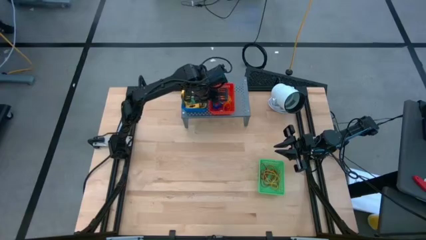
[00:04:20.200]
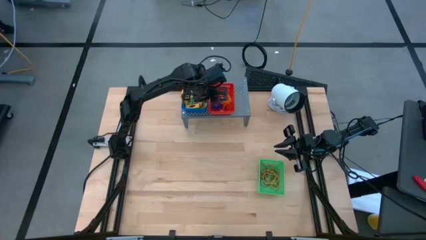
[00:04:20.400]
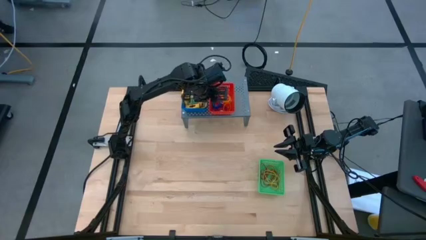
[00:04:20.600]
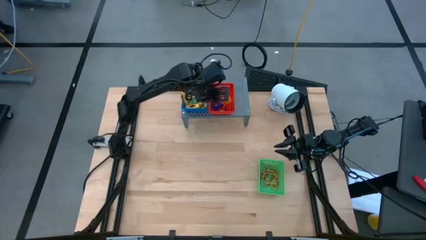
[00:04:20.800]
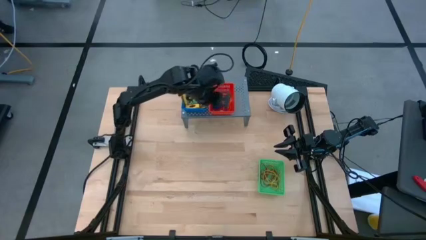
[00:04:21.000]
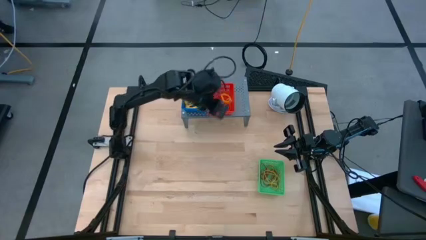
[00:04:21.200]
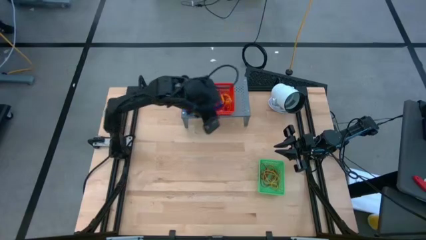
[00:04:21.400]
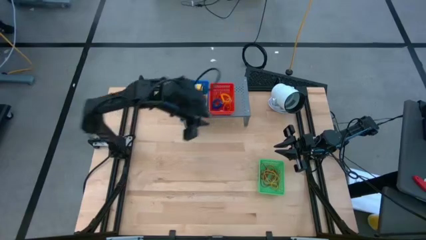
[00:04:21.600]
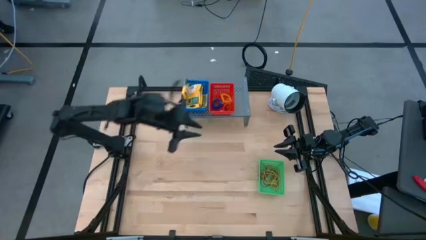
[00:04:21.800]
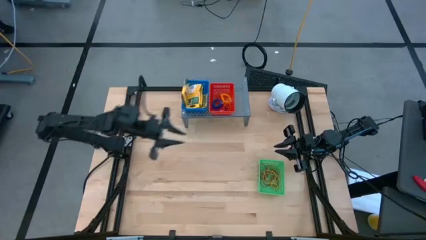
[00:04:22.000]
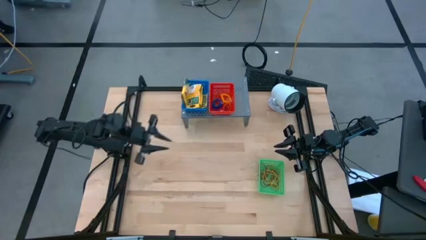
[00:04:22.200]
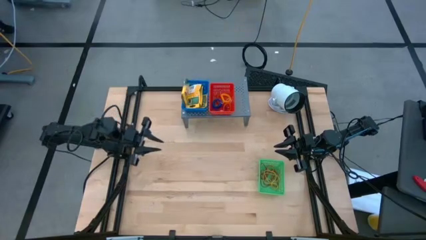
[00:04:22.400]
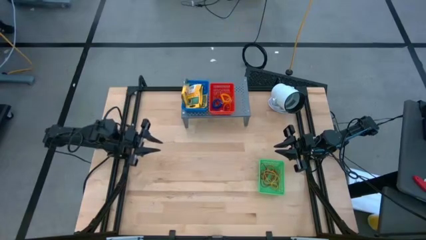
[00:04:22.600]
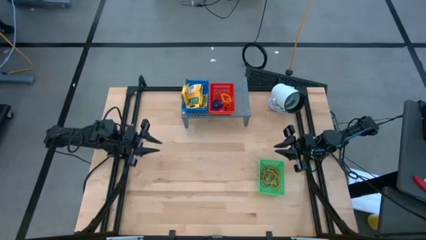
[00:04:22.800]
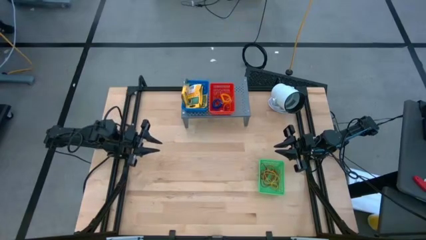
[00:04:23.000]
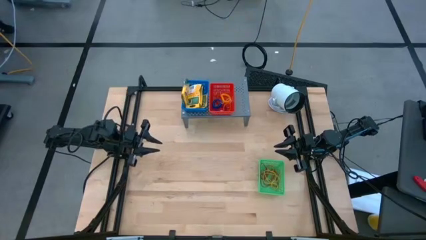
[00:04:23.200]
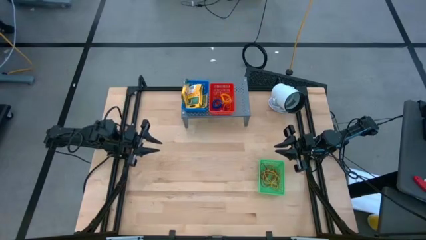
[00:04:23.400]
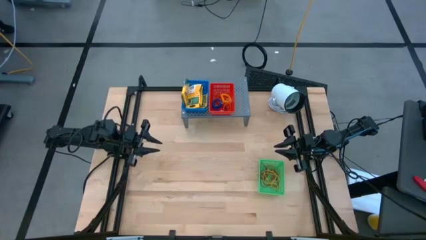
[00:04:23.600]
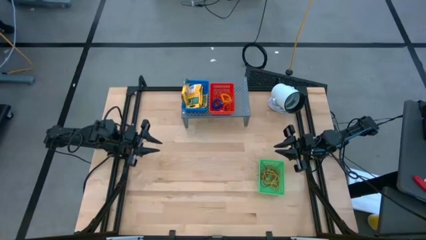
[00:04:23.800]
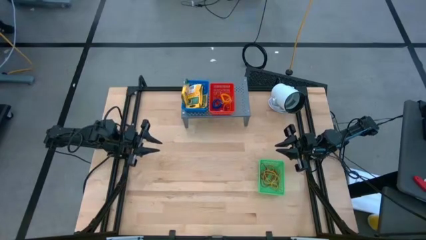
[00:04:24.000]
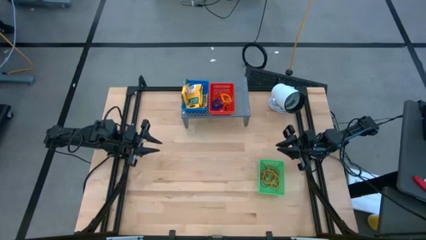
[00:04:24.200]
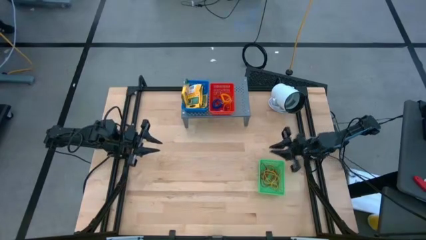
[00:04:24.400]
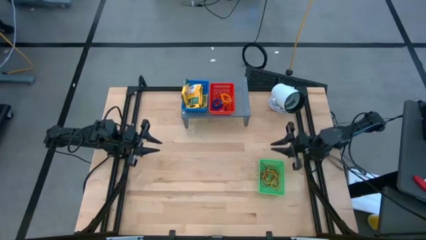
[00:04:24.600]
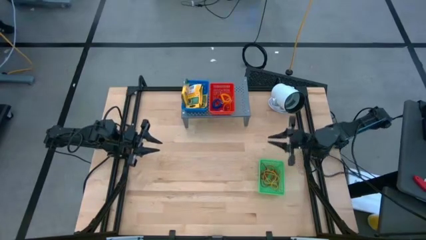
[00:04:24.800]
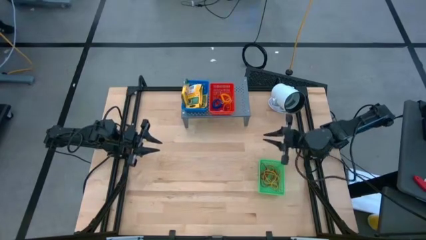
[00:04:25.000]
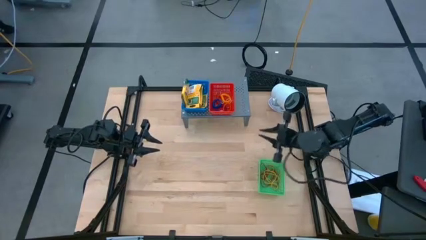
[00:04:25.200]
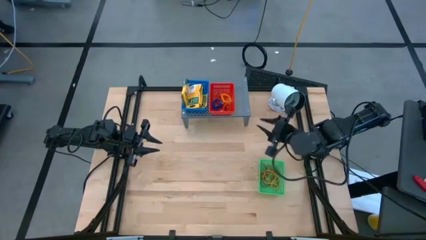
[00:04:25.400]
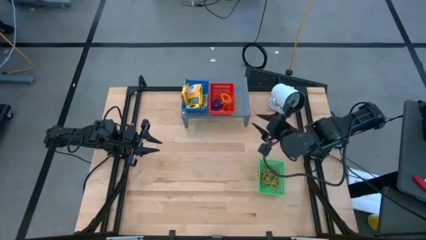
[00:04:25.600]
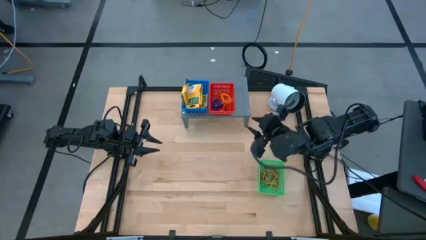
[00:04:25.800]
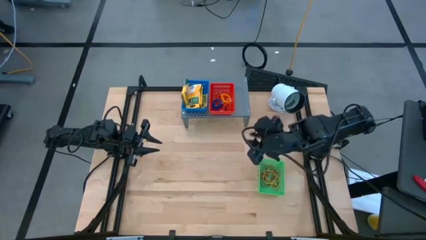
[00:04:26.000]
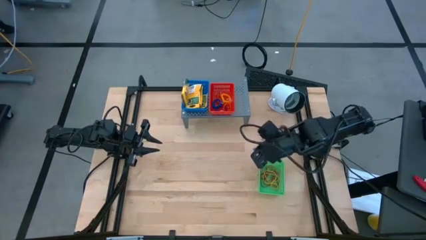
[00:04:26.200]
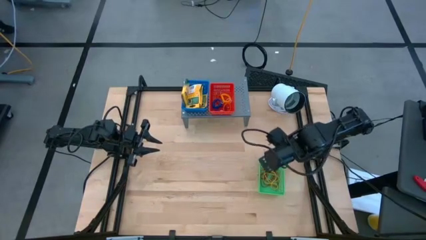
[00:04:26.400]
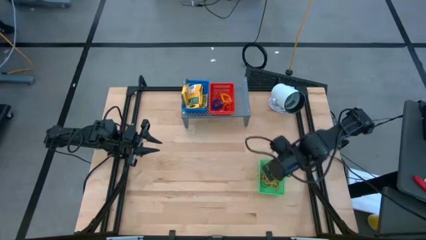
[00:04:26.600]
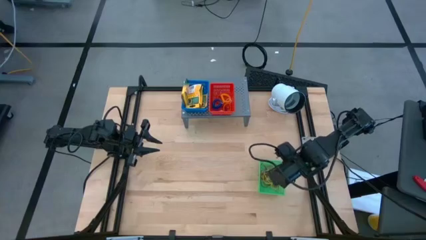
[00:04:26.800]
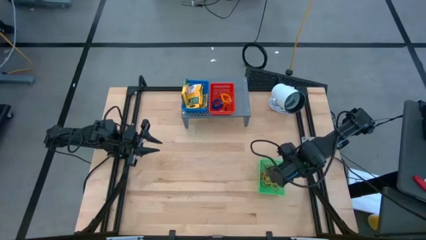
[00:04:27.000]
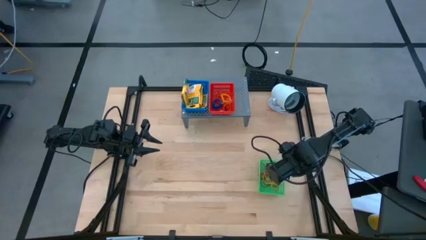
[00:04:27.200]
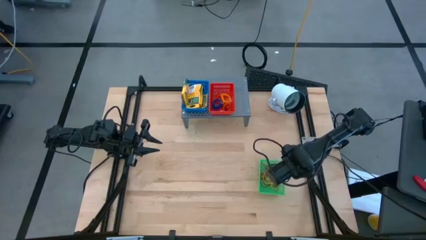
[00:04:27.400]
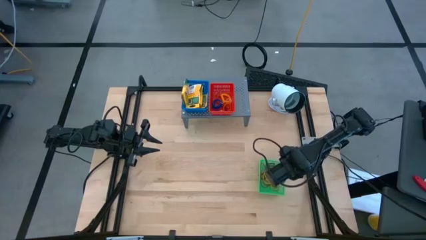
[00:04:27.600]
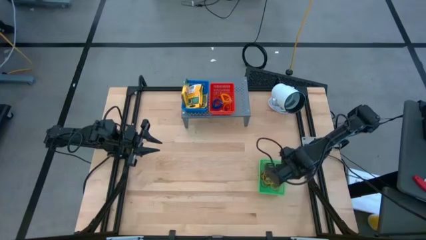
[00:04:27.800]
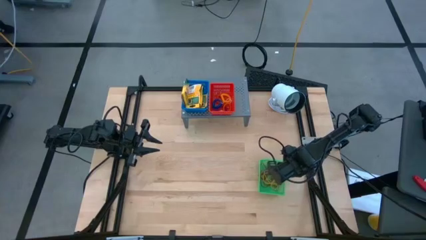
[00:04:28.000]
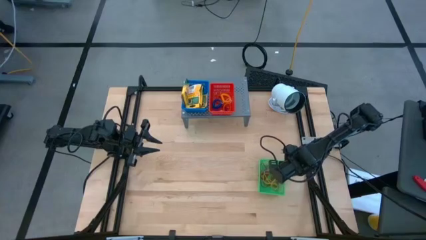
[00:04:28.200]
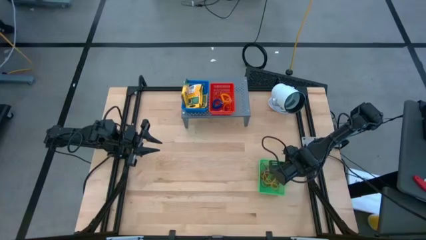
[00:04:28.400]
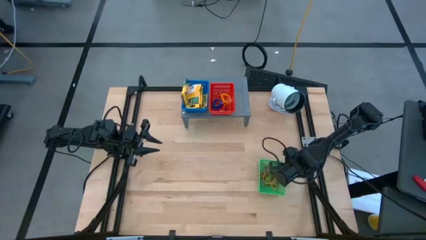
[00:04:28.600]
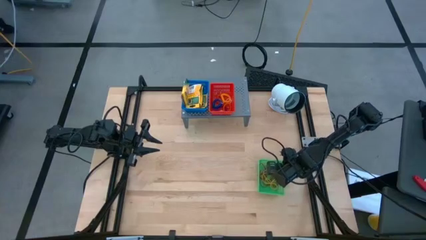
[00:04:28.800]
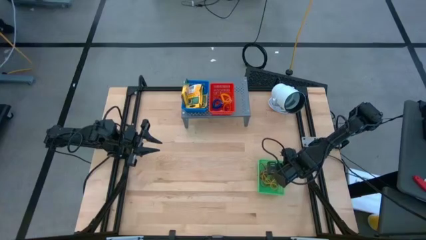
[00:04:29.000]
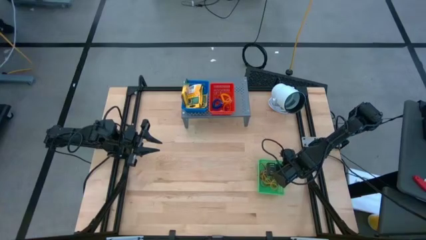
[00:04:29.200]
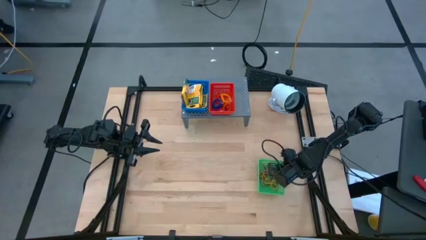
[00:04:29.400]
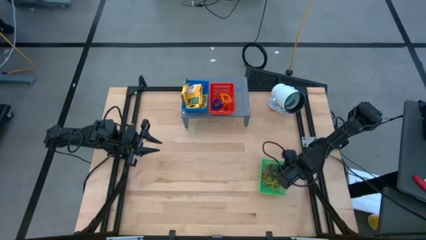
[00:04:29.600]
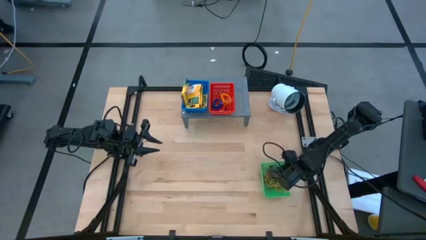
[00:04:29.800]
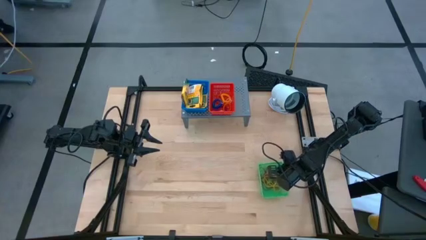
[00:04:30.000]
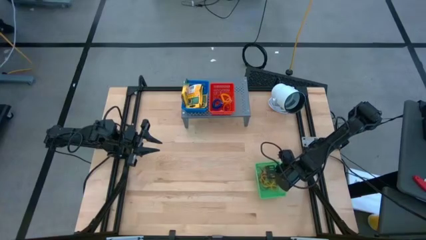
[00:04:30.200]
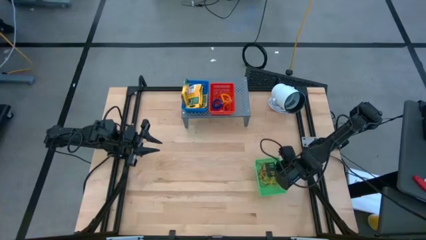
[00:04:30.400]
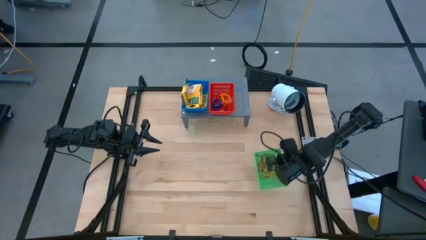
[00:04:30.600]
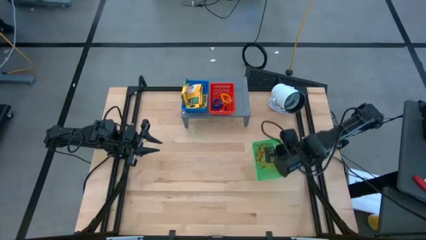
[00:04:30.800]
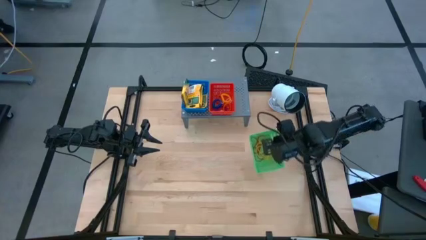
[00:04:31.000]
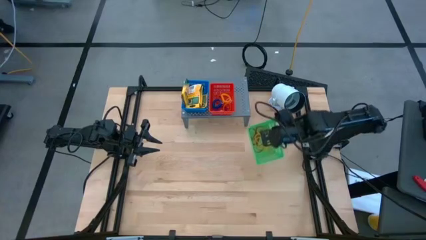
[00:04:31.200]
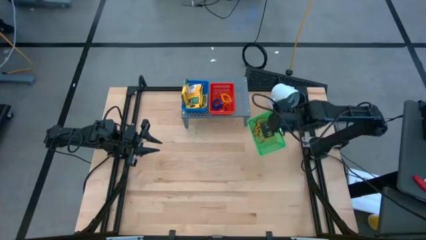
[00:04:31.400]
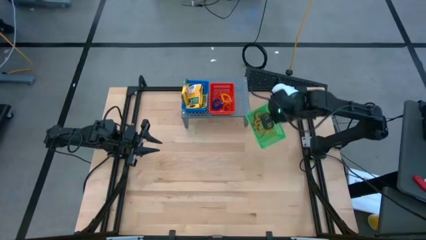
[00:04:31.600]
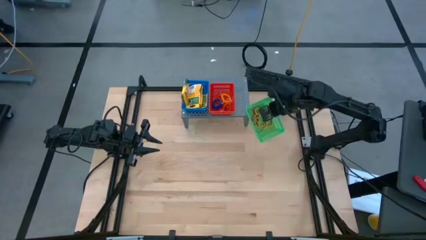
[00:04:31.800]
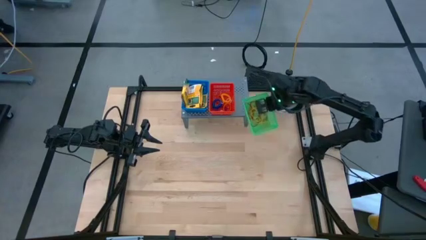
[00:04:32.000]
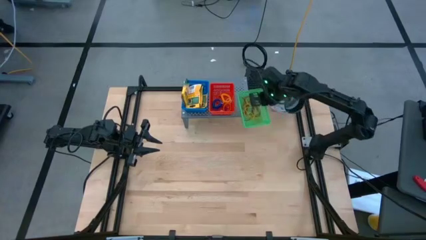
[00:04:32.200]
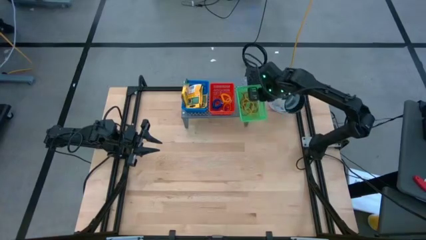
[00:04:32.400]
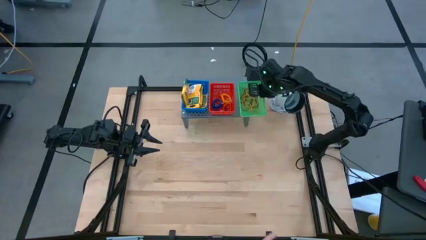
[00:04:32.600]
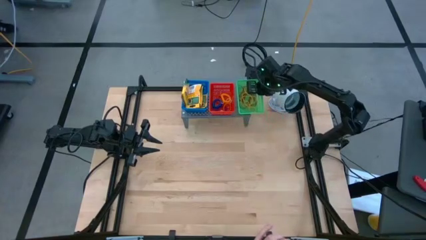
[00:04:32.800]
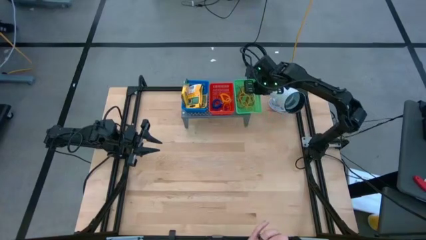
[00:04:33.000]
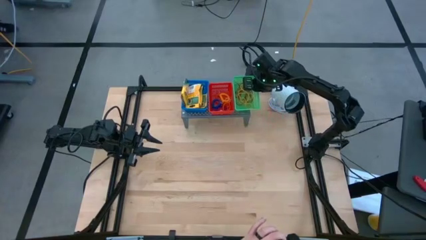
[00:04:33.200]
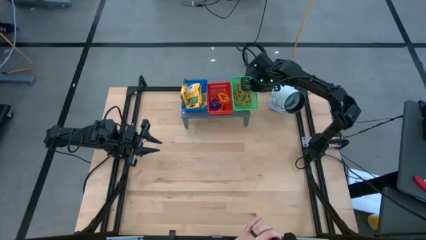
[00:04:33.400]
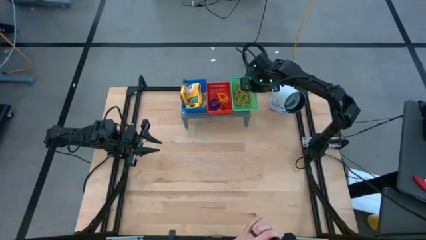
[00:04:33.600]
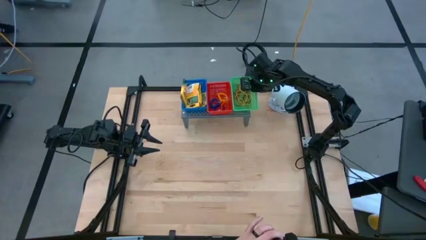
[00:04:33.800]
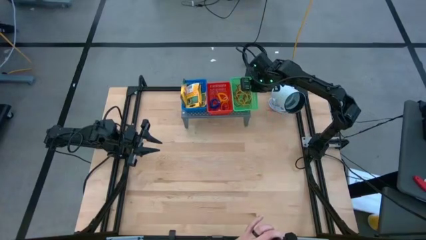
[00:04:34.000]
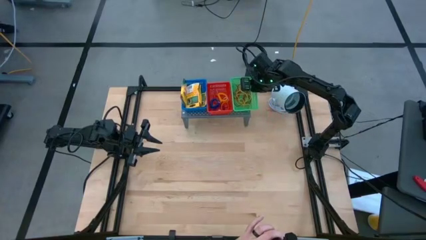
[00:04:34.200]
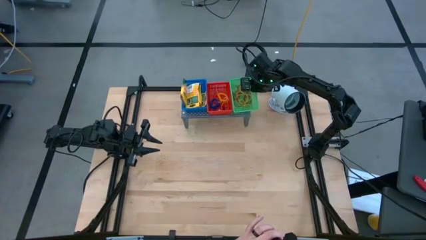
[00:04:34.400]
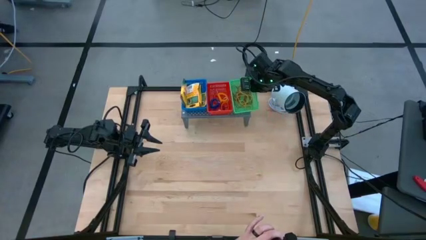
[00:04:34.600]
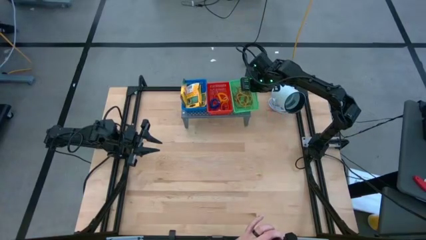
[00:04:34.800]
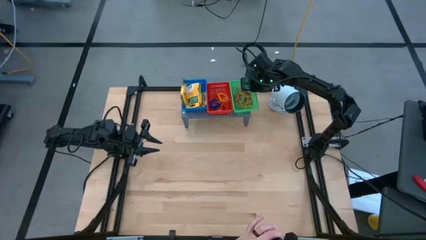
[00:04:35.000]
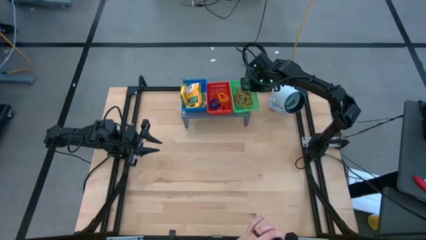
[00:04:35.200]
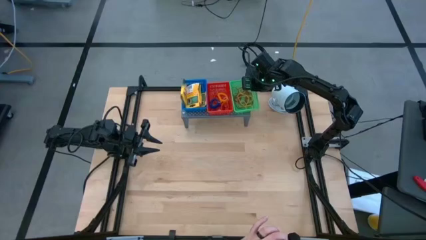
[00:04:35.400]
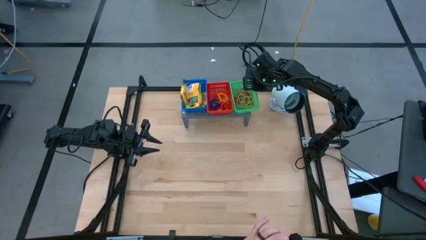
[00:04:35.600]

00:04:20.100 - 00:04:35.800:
Task: Pick & Place Office Desk Supplies
Put the green bin with rubber bands on the shelf
